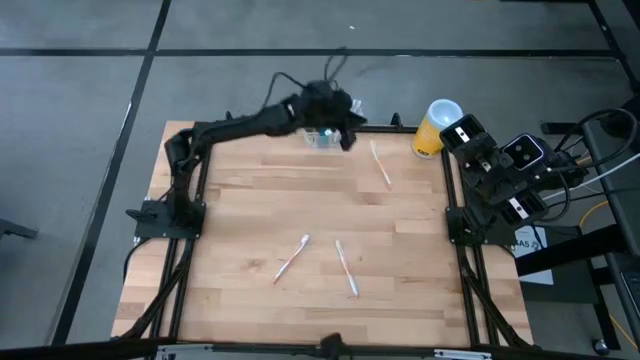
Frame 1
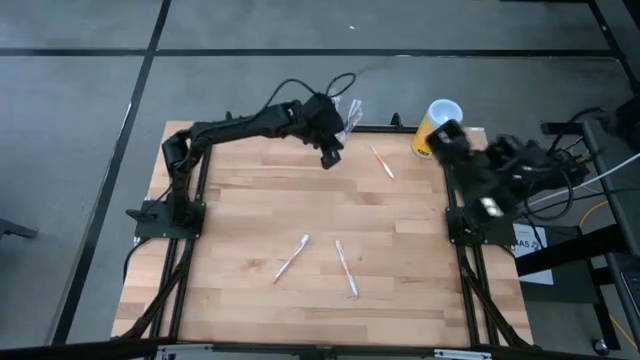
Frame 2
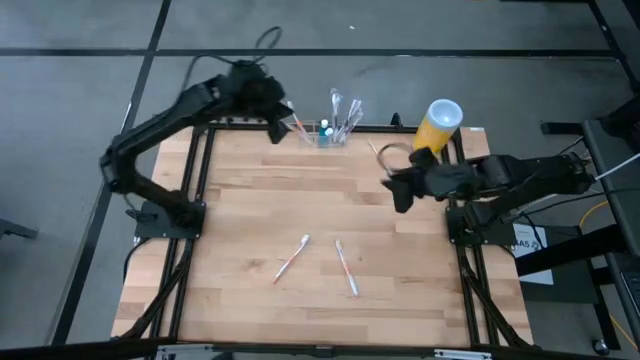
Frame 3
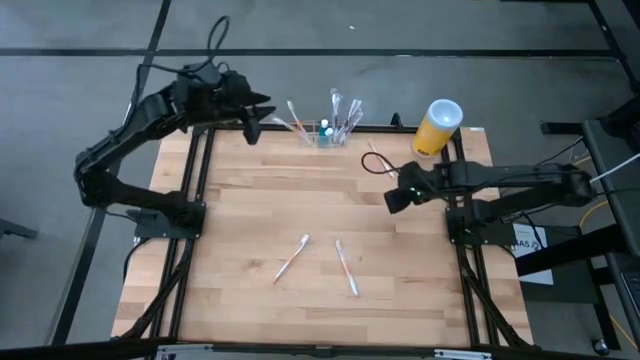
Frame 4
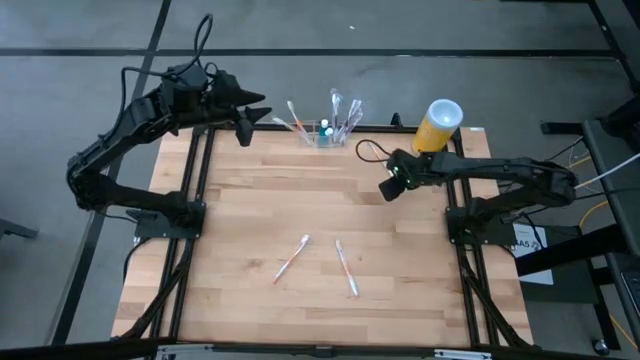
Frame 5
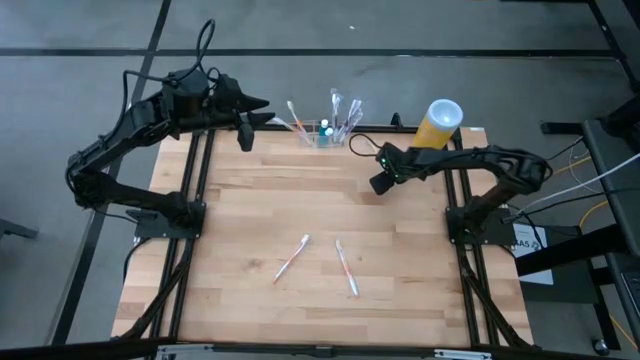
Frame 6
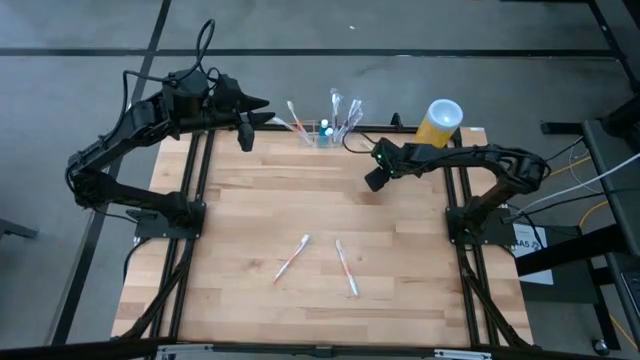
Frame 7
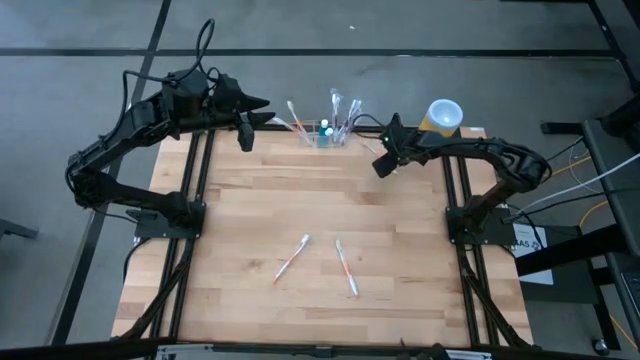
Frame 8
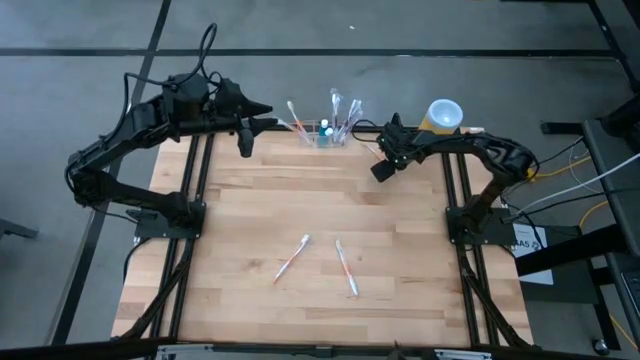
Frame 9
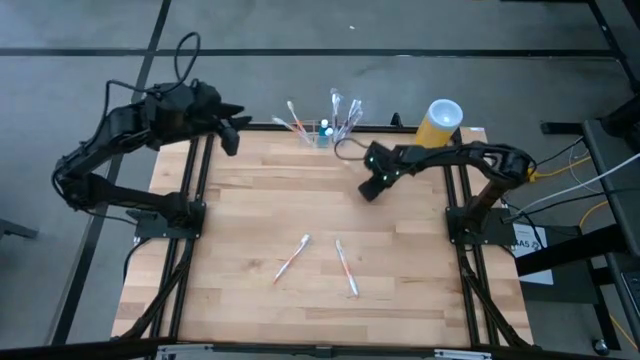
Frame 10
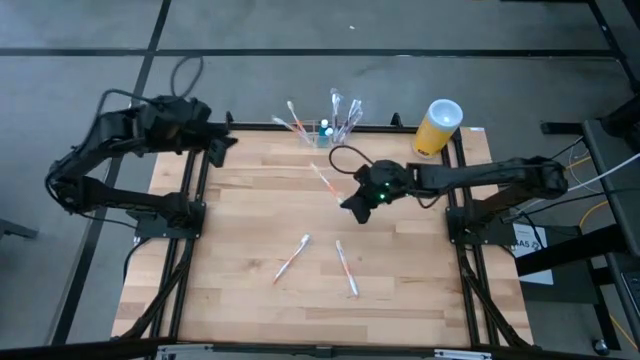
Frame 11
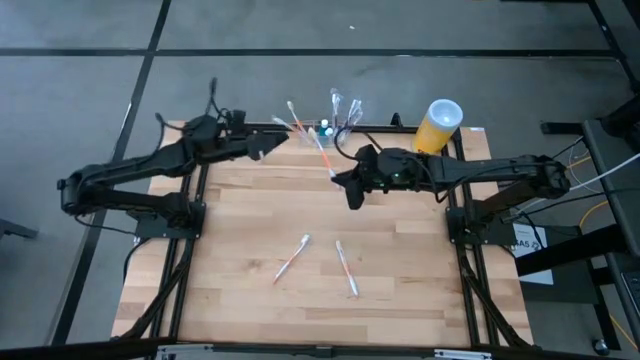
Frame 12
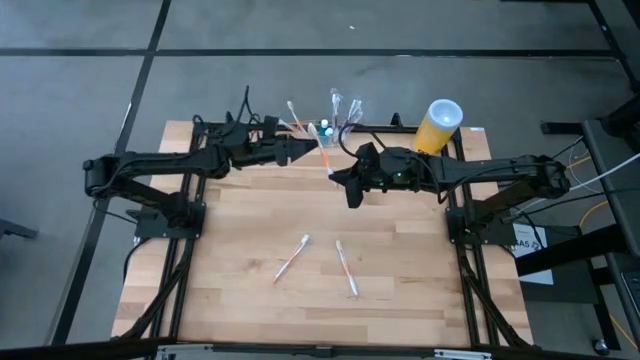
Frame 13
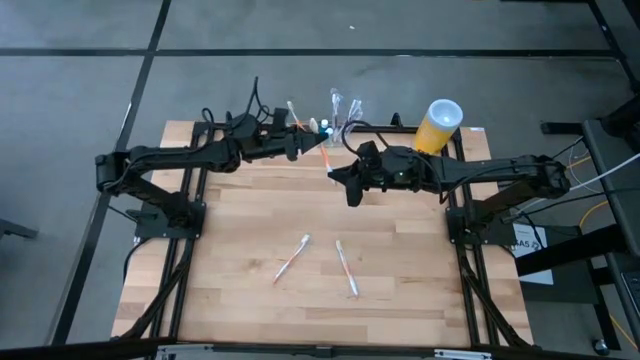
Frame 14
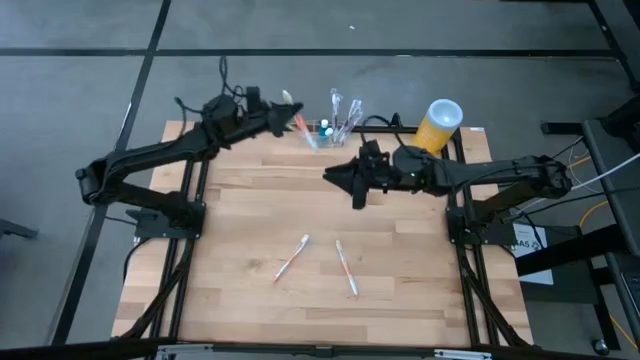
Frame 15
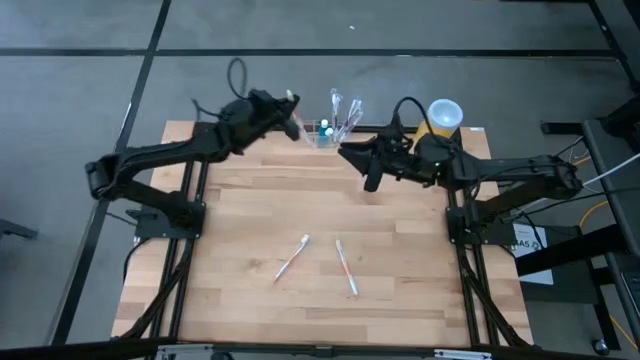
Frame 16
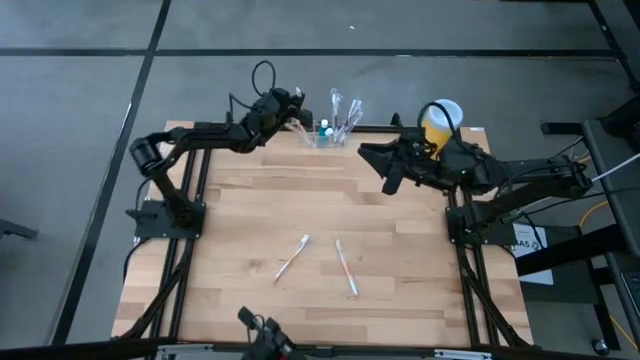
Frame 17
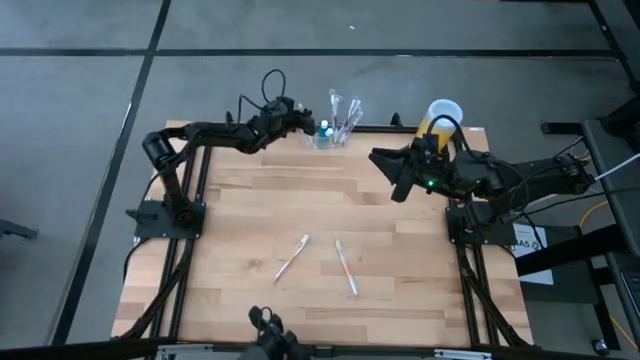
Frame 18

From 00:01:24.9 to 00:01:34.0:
Task: Pick & Place toothbrushing station
Put the orange toothbrush into the transparent organizer

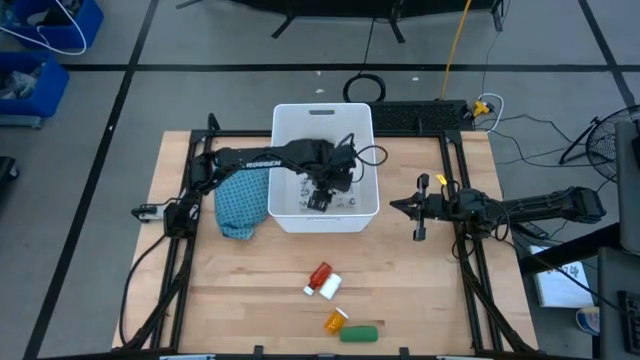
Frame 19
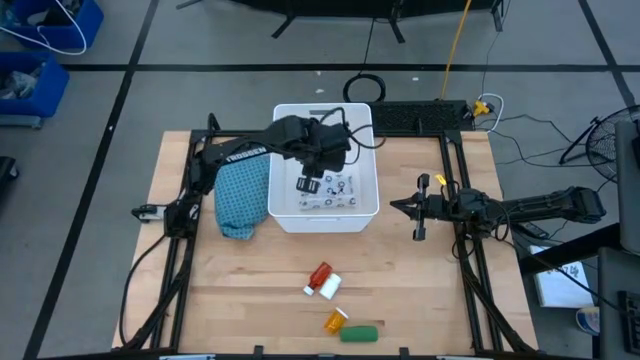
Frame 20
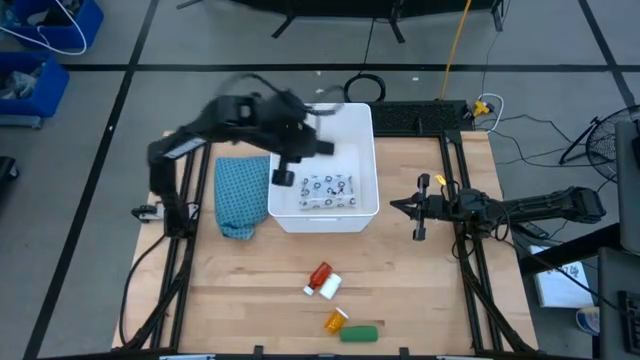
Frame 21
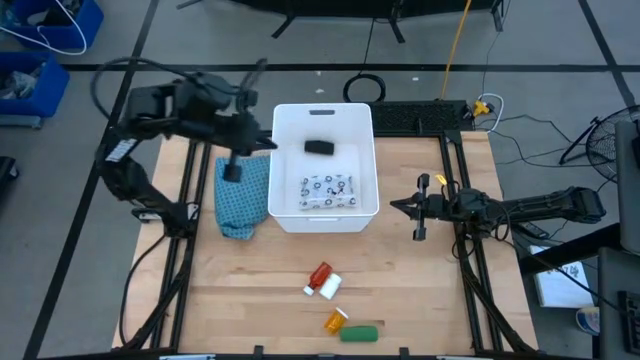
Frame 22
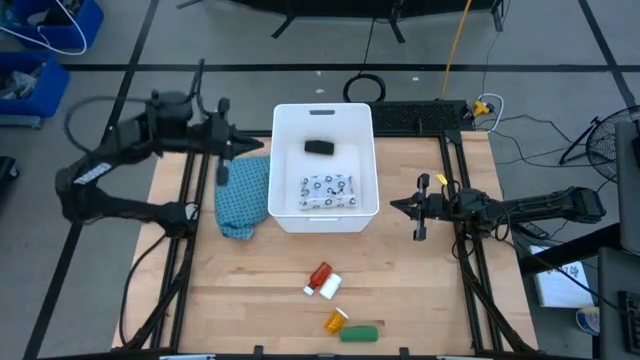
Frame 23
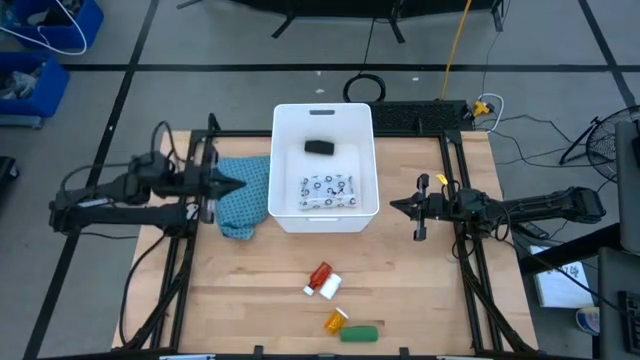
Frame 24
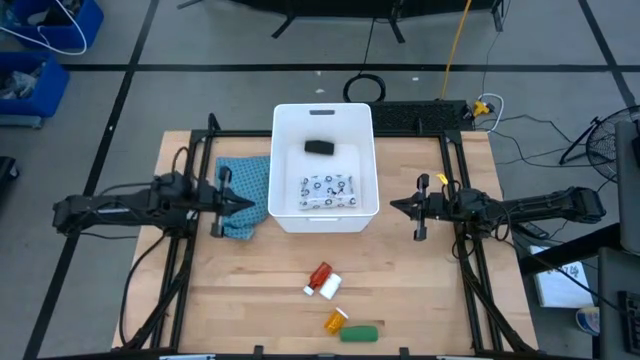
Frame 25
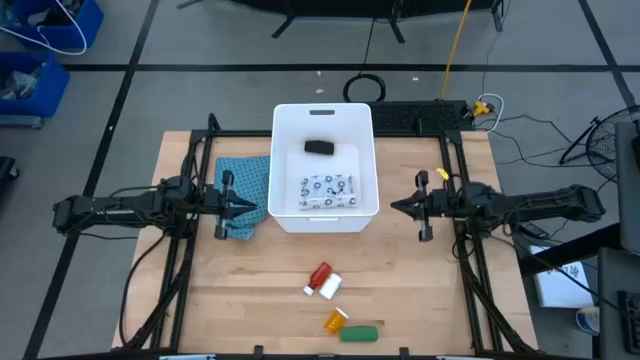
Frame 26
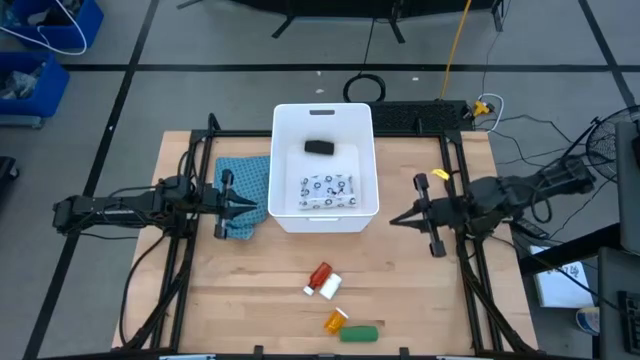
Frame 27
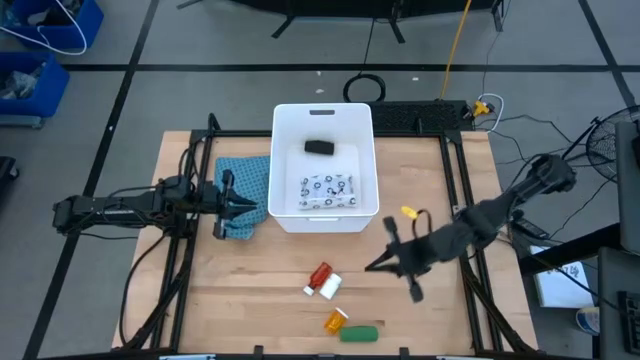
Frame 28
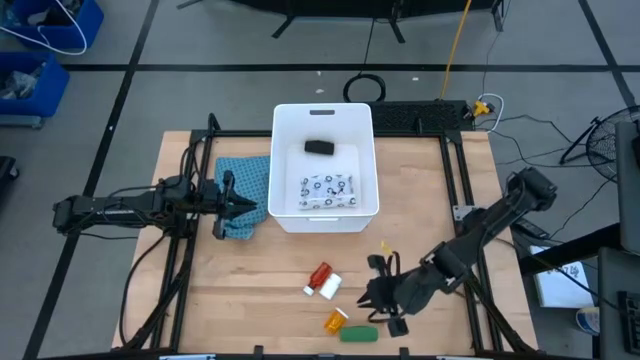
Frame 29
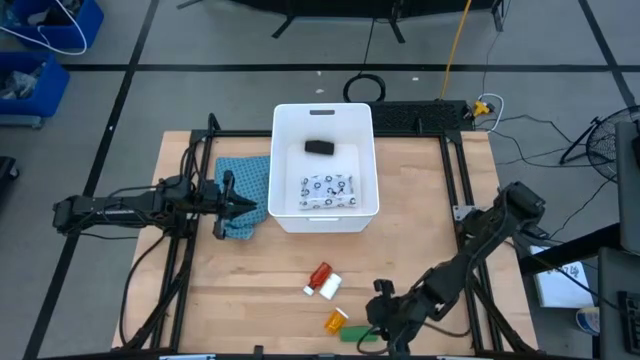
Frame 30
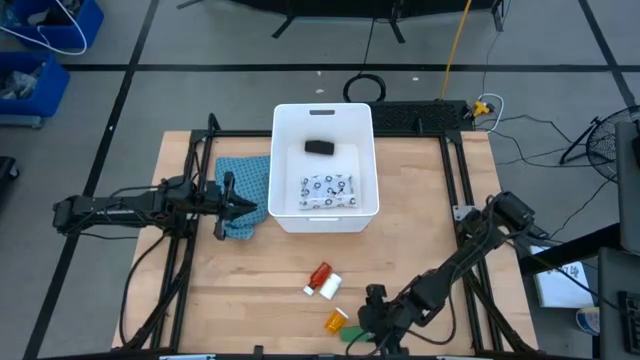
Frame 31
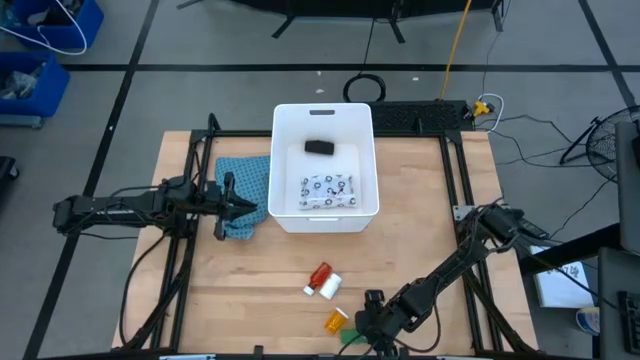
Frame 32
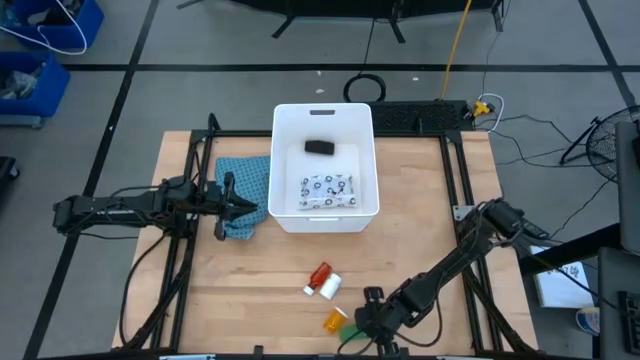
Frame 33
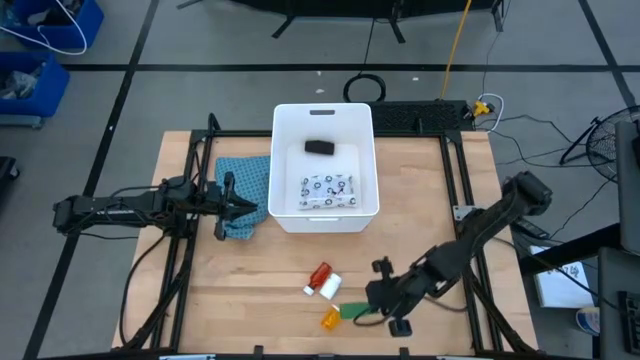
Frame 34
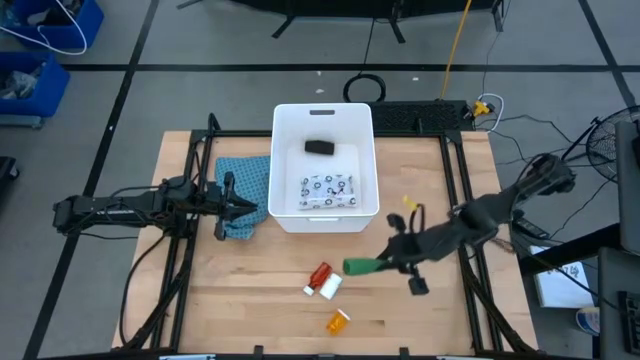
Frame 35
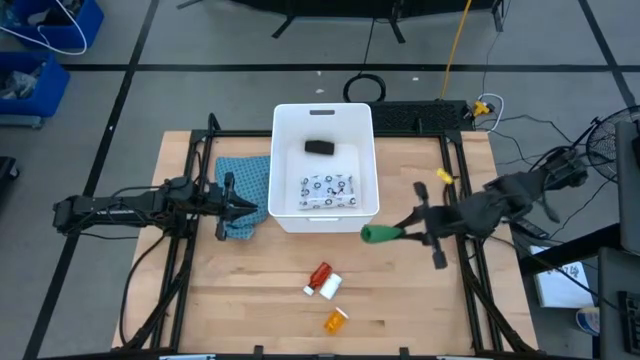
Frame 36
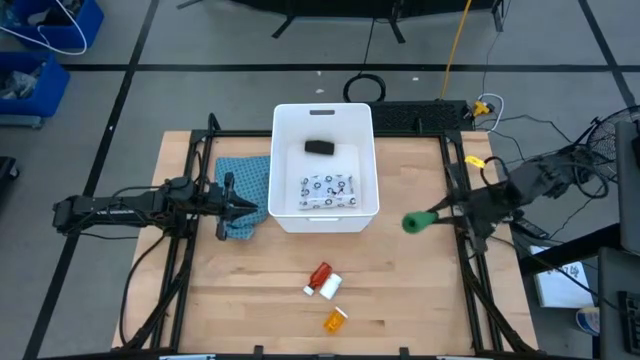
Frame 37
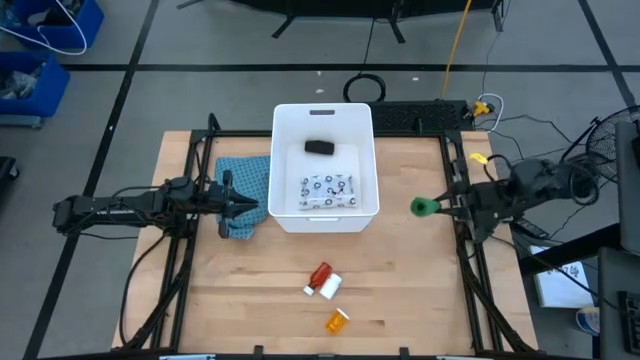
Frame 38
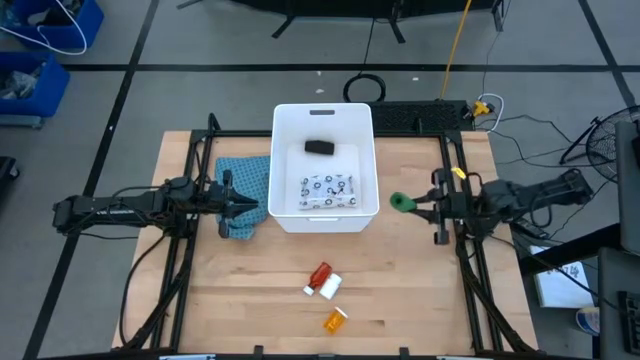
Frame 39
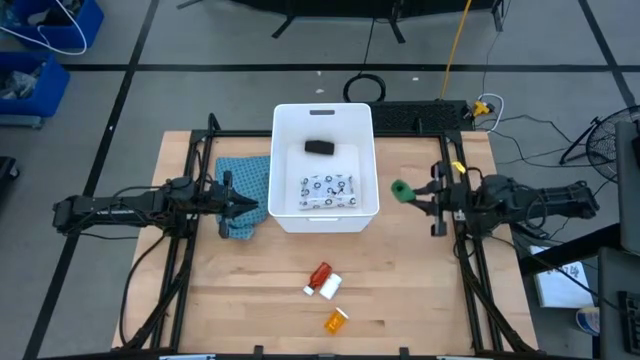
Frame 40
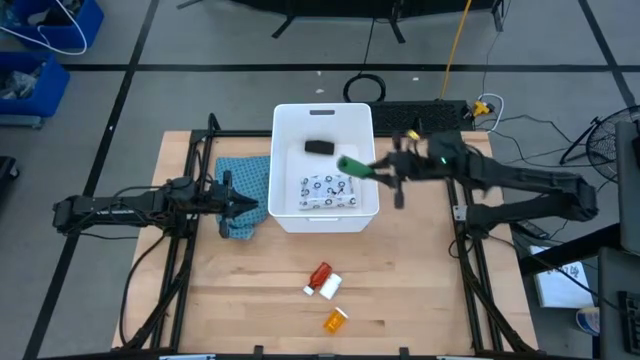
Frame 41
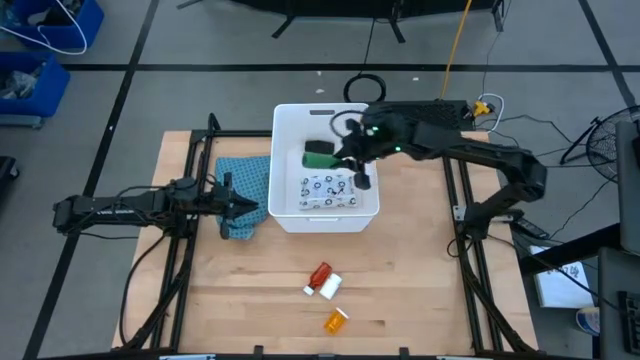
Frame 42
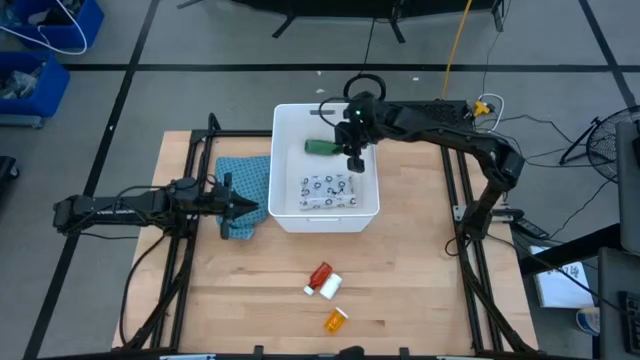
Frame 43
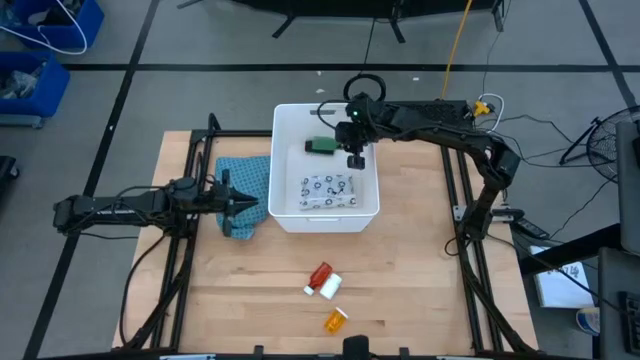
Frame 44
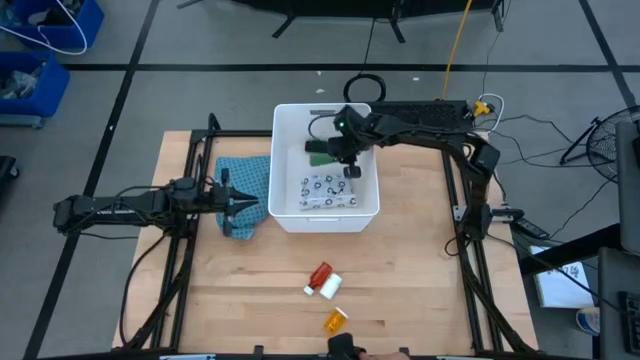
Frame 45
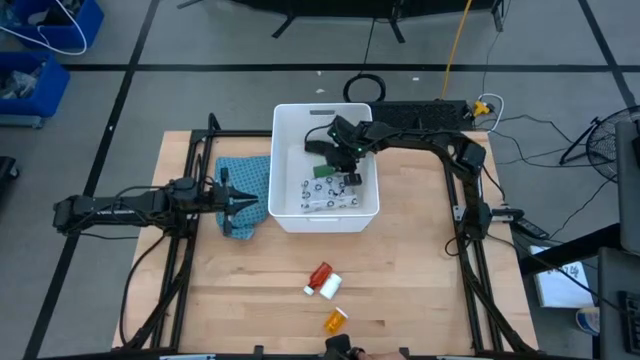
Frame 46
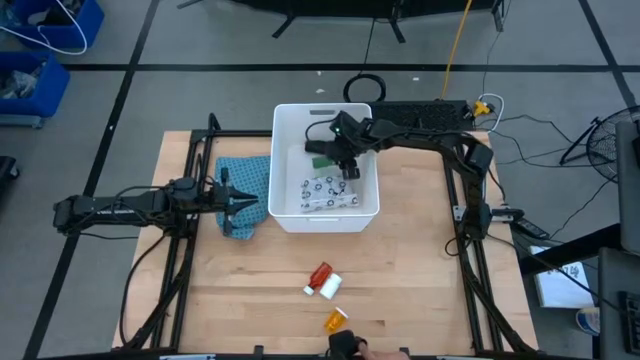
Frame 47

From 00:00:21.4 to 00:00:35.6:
Task: Pick & place medical supplies in basket/bin
Put the green bandage into the white container
